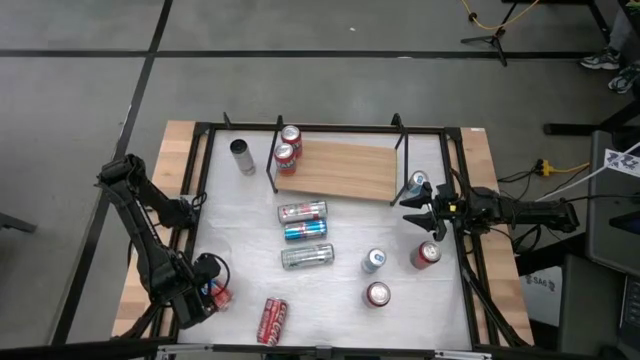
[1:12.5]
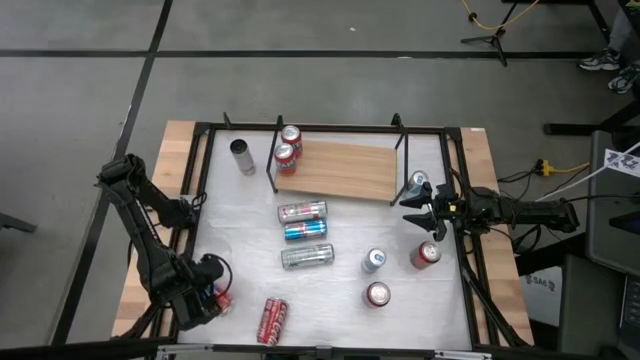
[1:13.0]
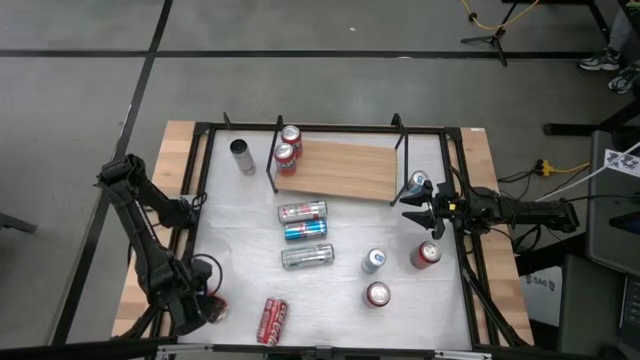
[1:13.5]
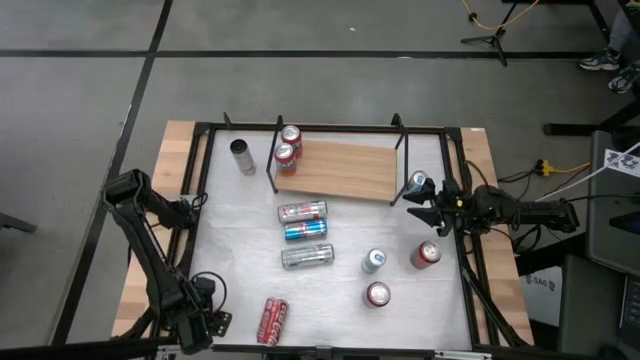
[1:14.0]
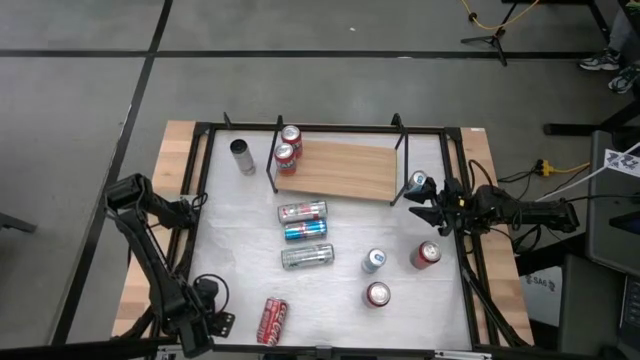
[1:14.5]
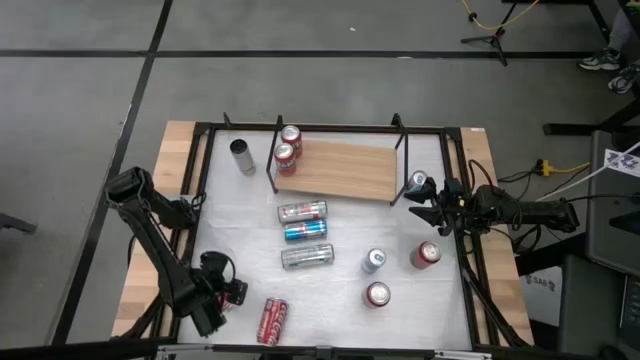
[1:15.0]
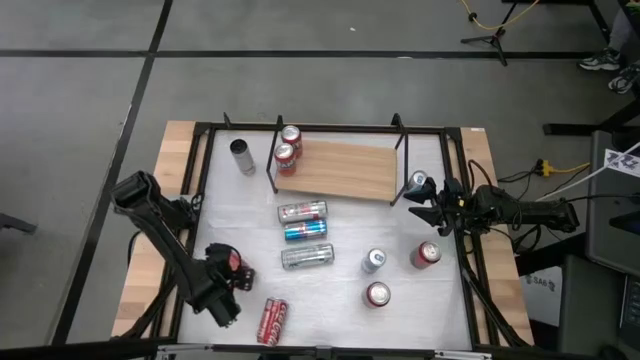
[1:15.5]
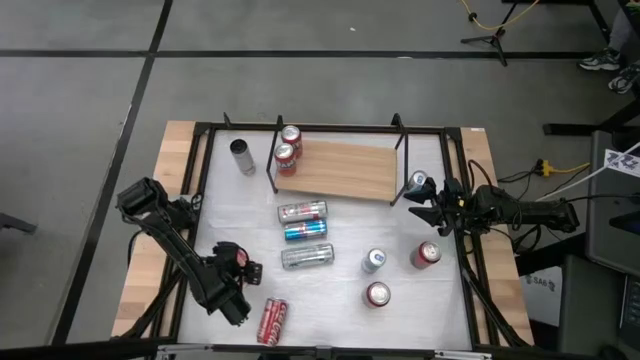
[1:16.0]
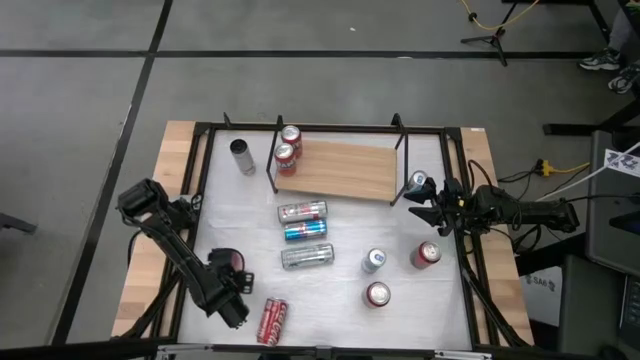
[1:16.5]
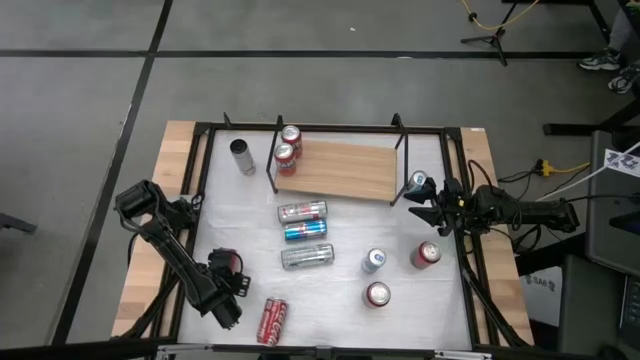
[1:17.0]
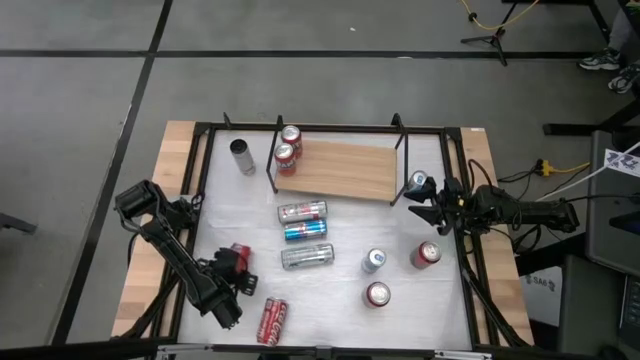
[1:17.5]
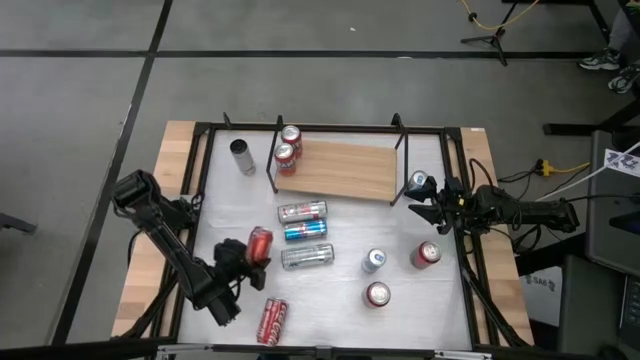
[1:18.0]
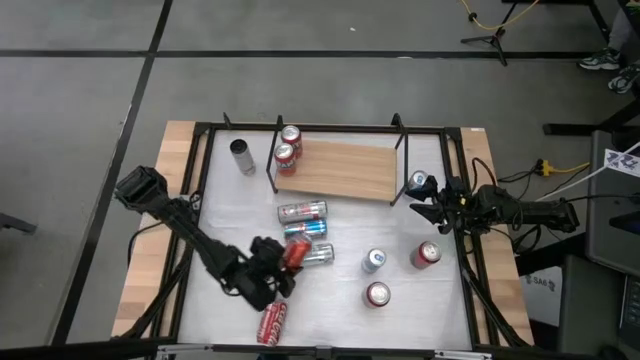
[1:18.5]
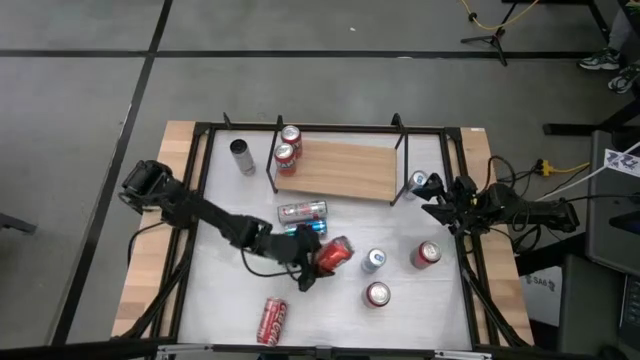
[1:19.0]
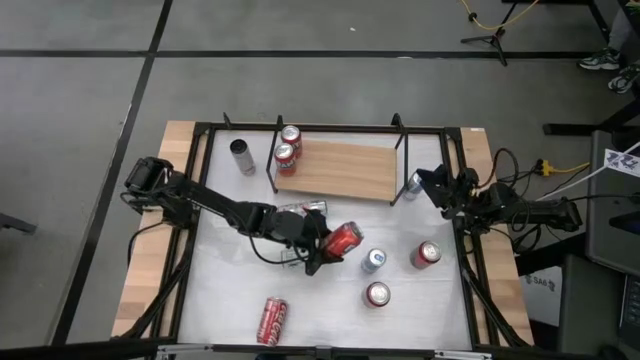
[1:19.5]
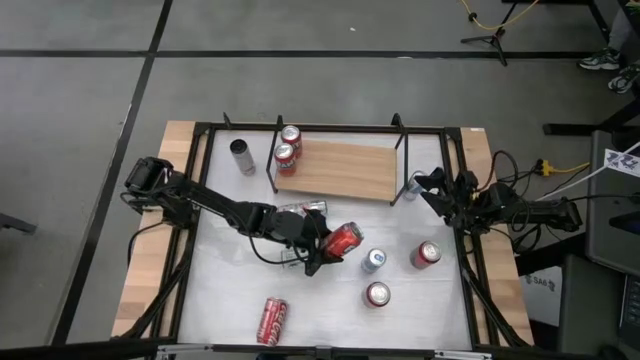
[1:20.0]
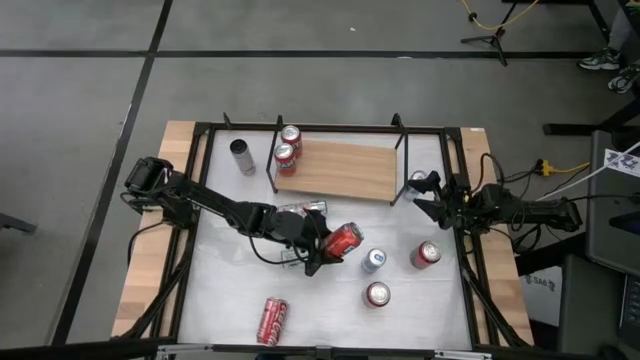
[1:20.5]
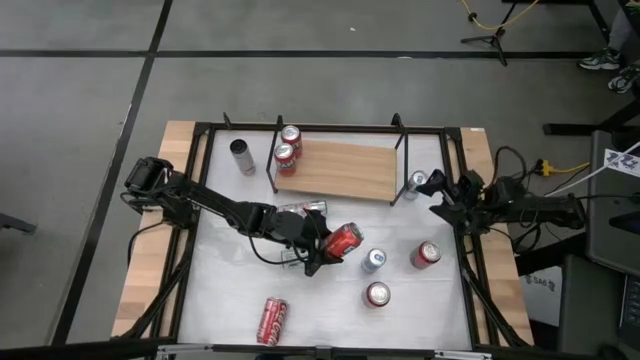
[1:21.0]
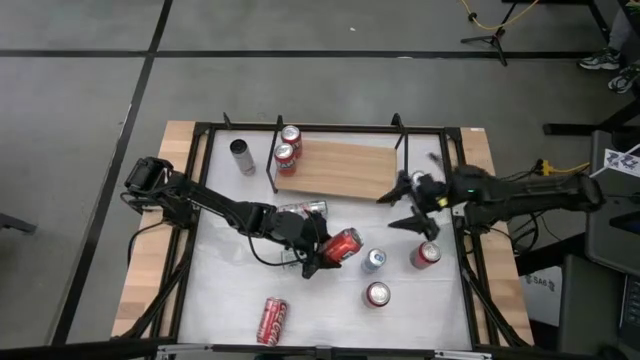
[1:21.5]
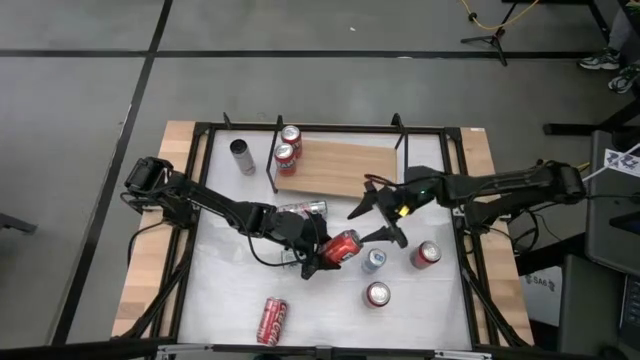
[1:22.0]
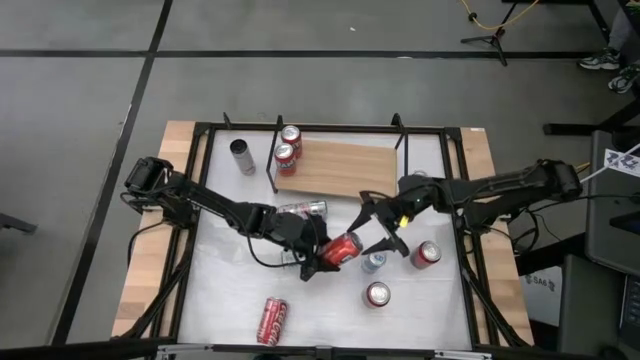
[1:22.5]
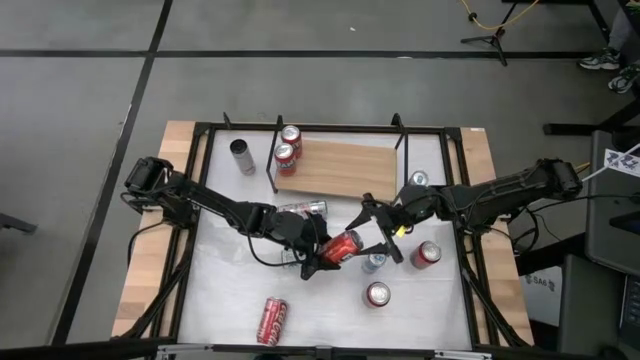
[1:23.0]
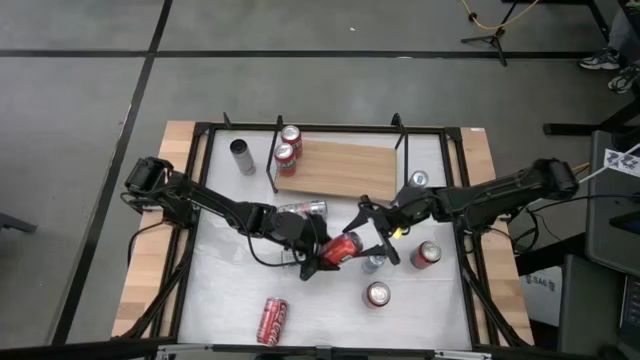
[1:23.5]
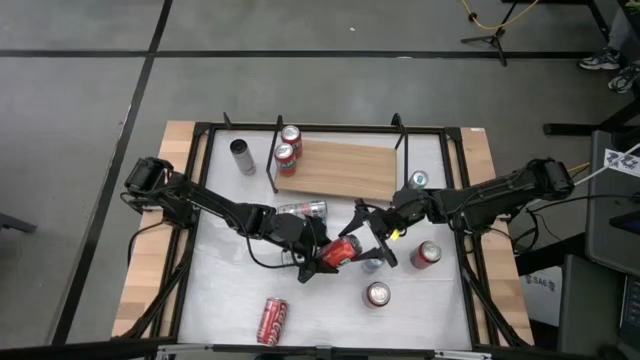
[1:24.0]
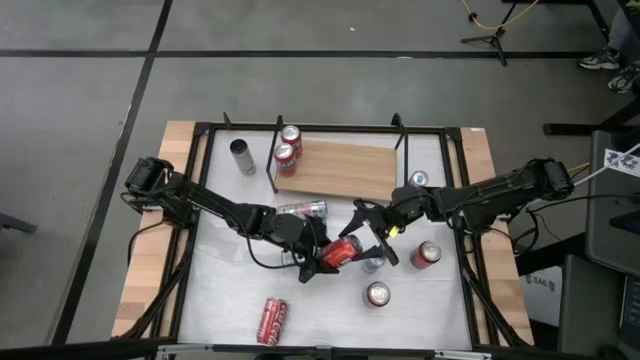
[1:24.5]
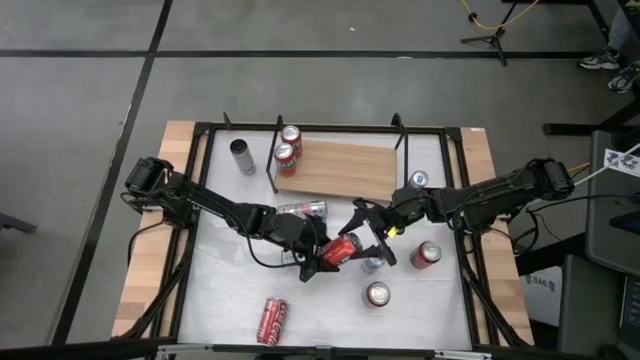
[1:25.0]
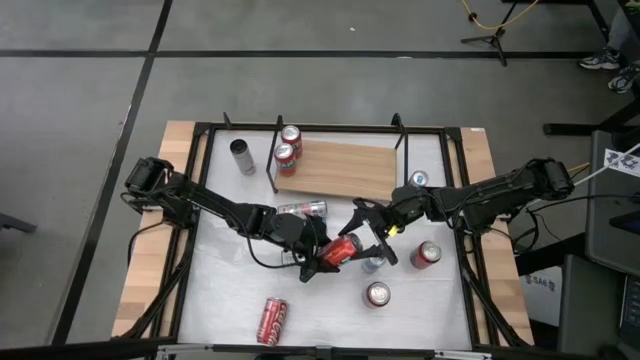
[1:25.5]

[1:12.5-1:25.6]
Task: Place canned beverage on shelf
Put the red soda can on the shelf

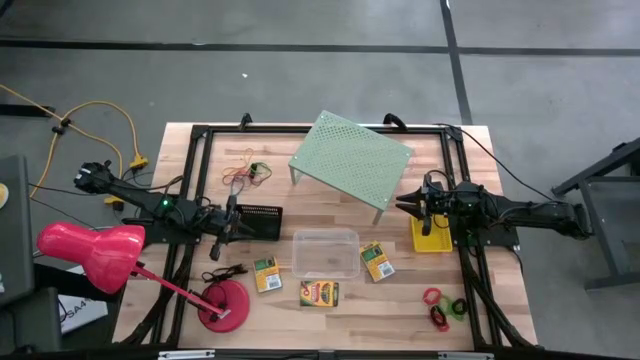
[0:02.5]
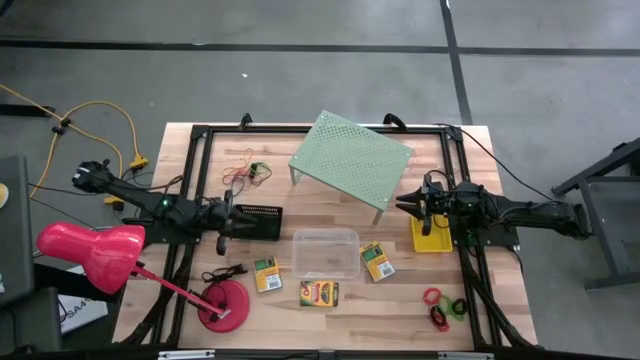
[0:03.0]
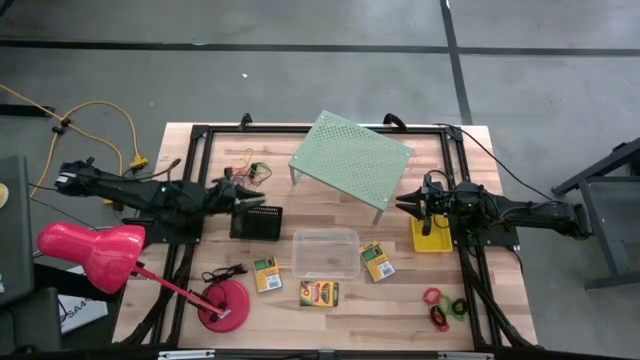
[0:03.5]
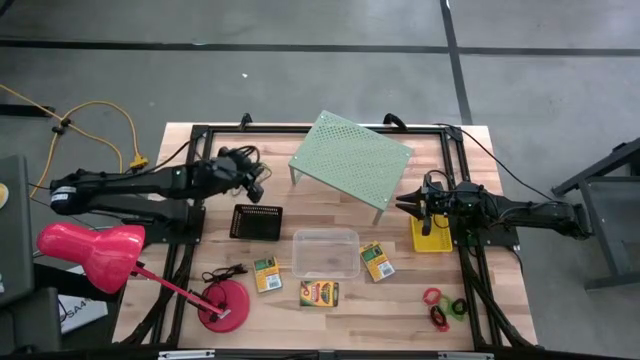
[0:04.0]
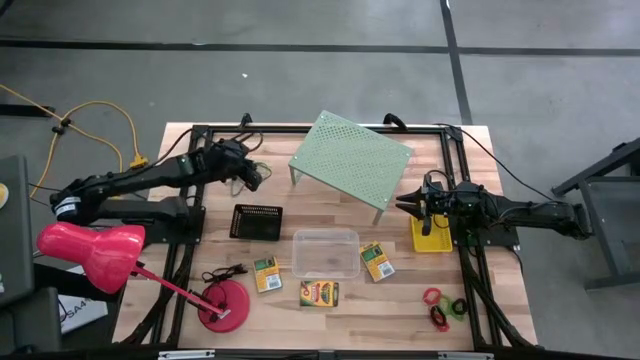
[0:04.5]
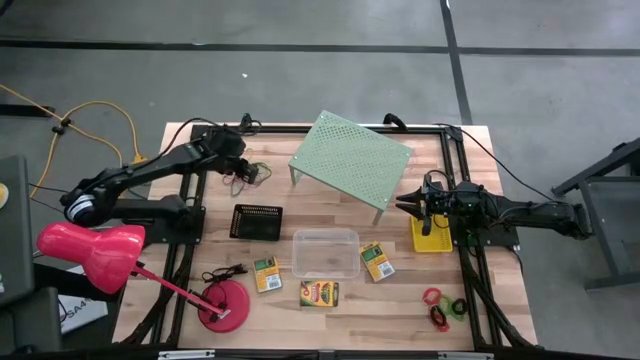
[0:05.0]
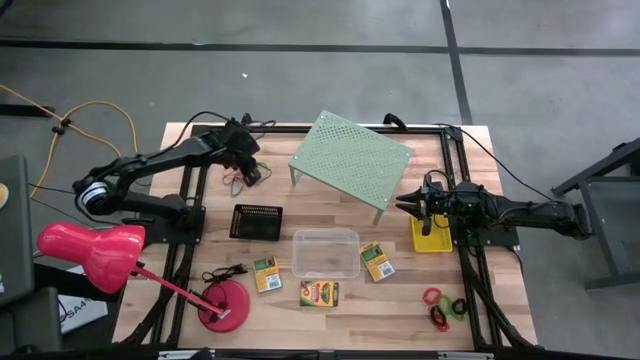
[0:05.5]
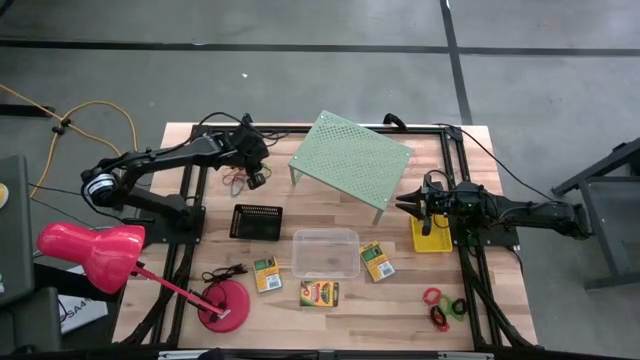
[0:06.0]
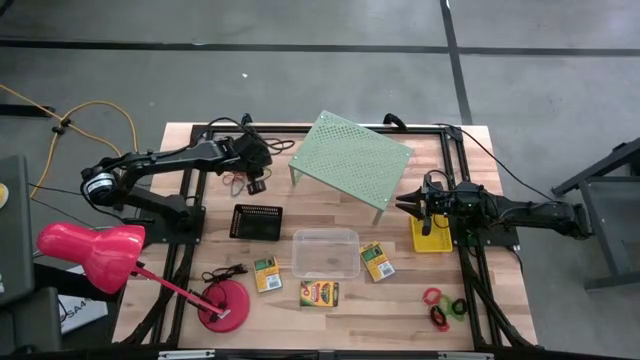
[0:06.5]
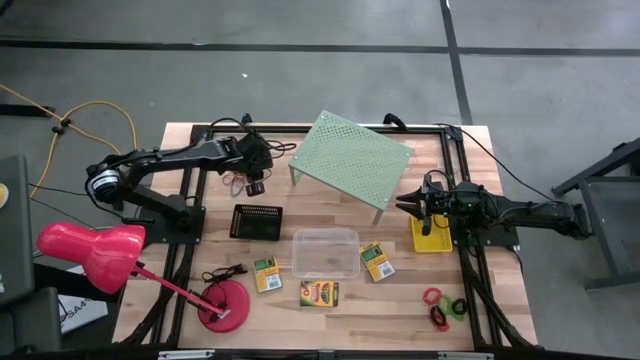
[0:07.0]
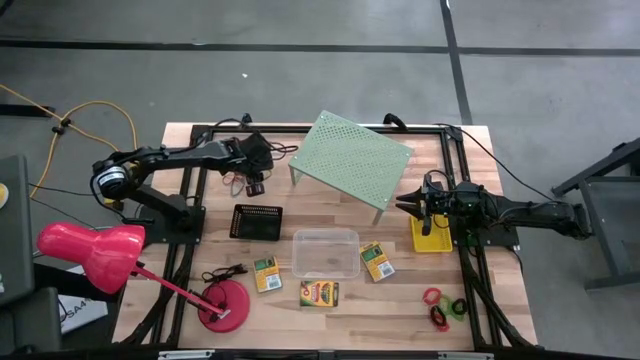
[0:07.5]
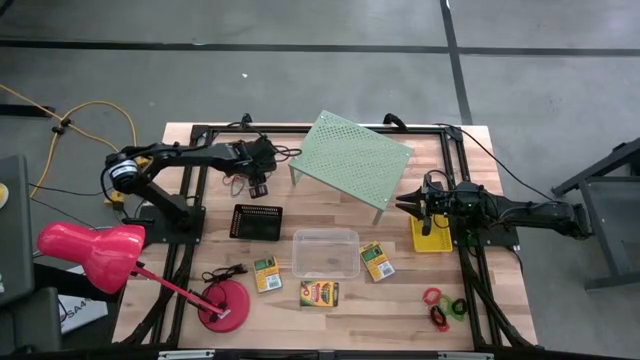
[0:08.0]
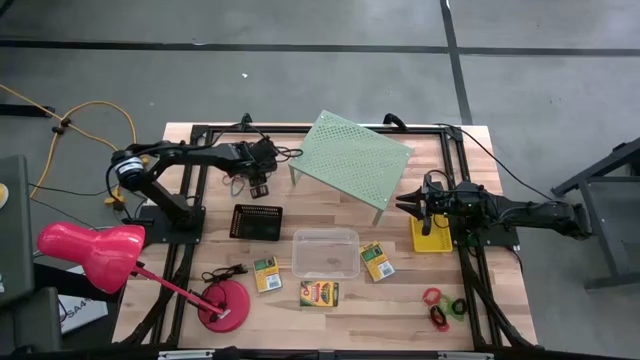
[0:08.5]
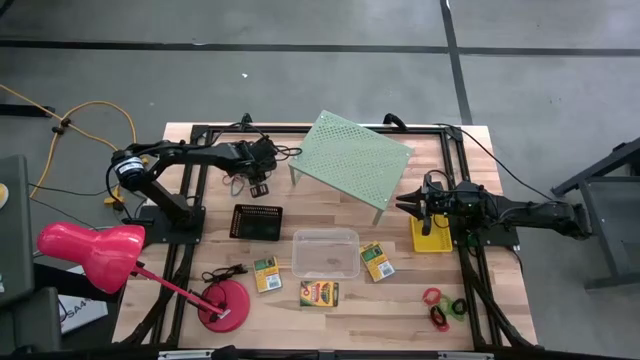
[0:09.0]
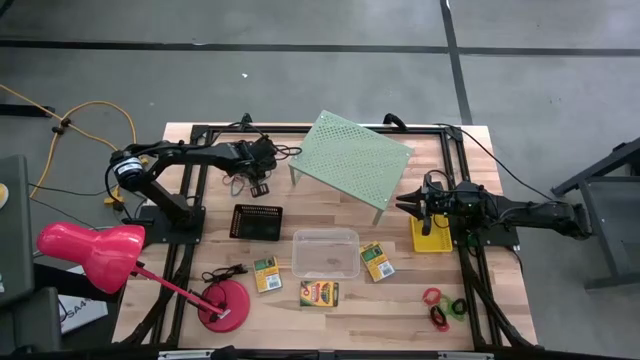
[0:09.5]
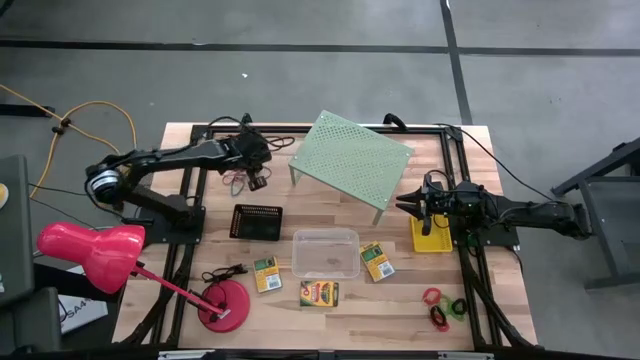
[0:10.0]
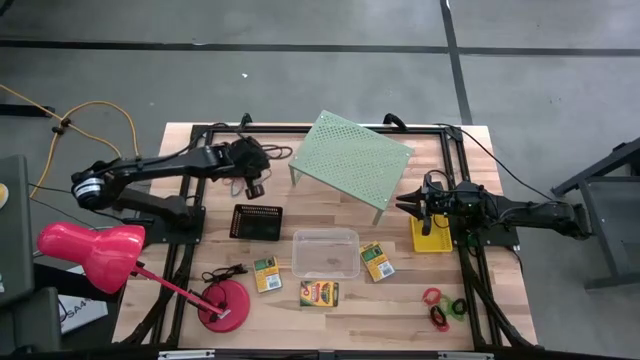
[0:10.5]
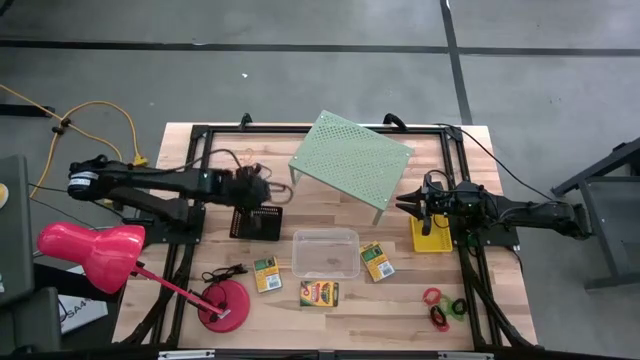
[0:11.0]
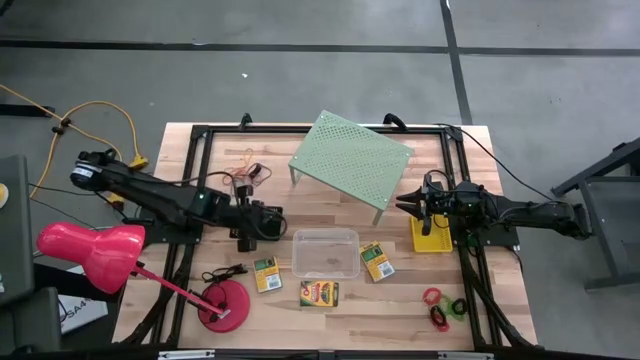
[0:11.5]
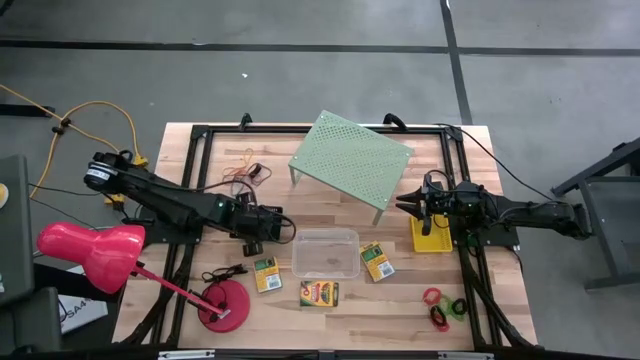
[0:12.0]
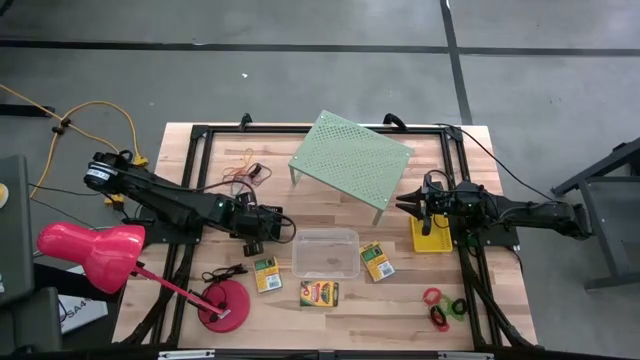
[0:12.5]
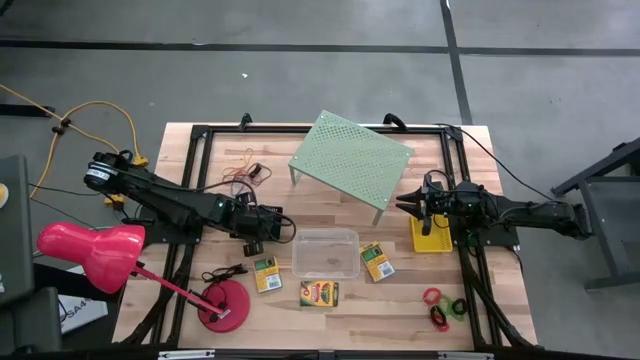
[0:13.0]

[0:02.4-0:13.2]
Task: Pick & Place Office Desk Supplies
Put the green rubber band into the black bin
